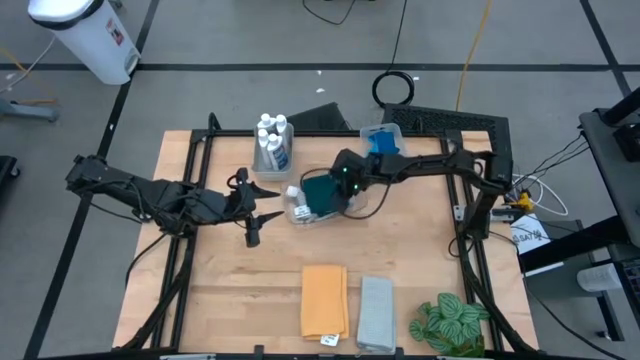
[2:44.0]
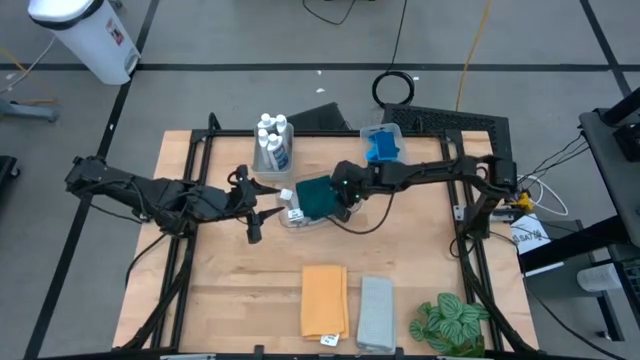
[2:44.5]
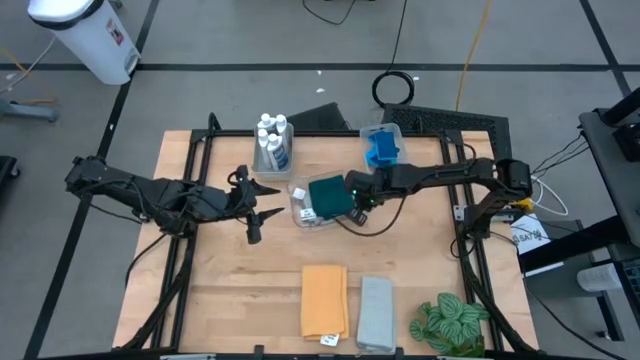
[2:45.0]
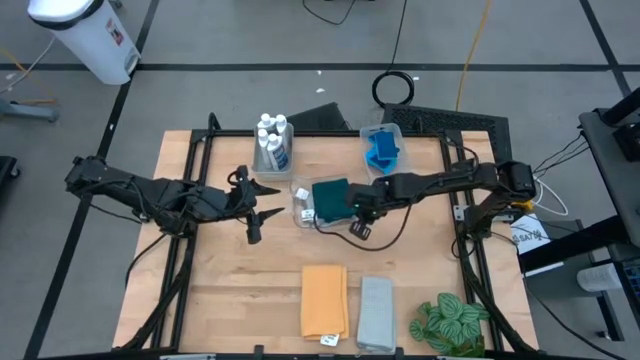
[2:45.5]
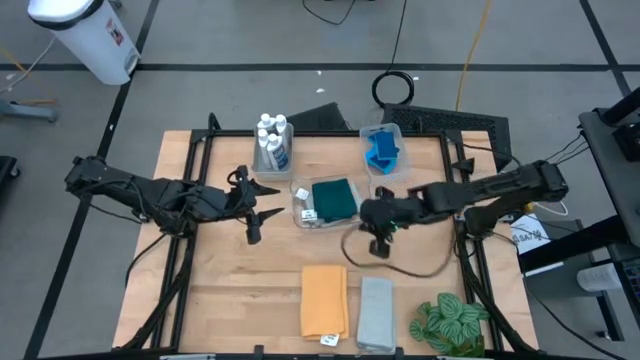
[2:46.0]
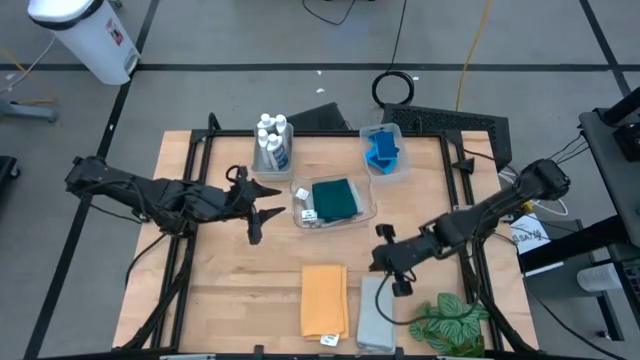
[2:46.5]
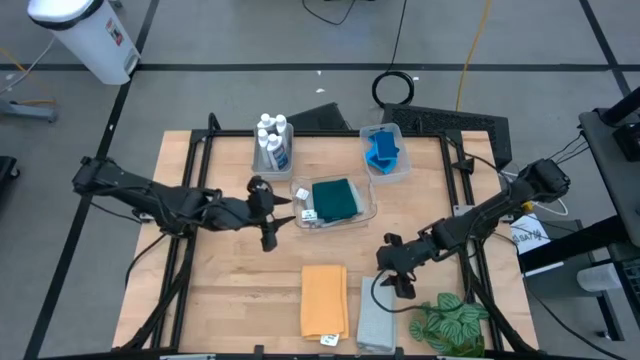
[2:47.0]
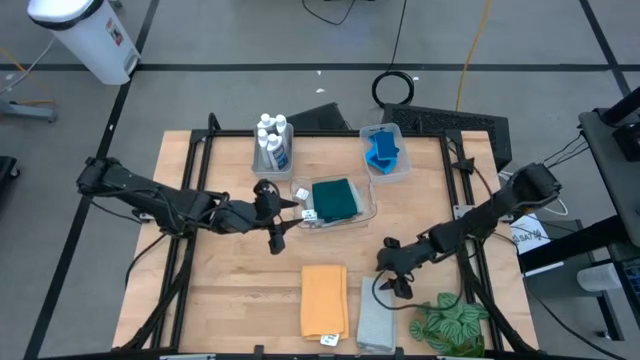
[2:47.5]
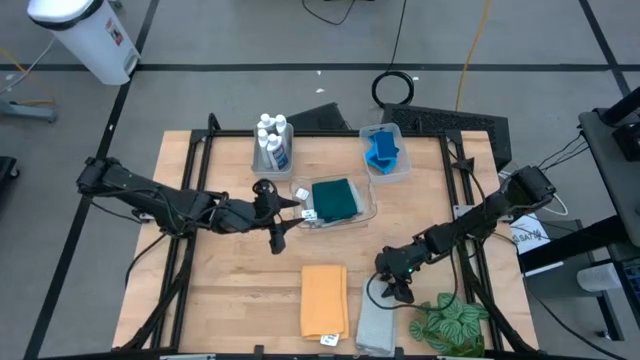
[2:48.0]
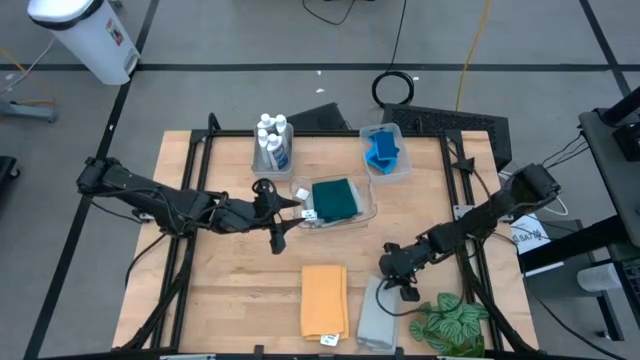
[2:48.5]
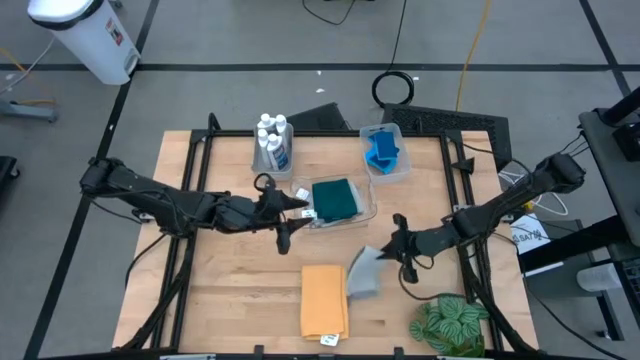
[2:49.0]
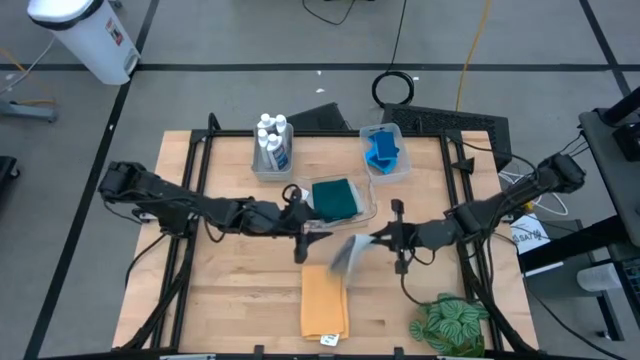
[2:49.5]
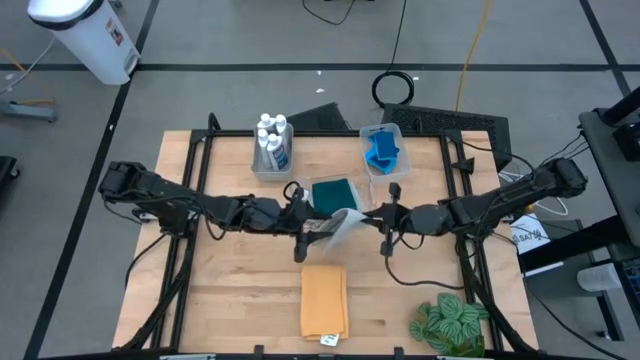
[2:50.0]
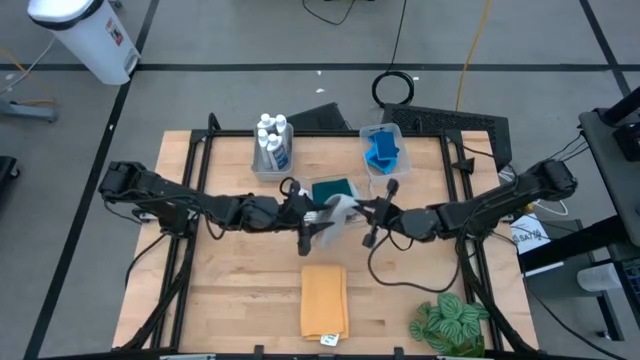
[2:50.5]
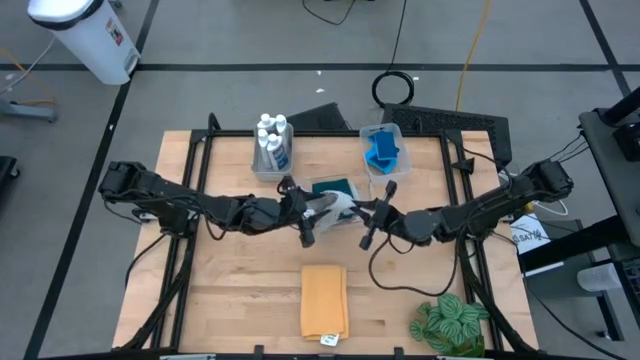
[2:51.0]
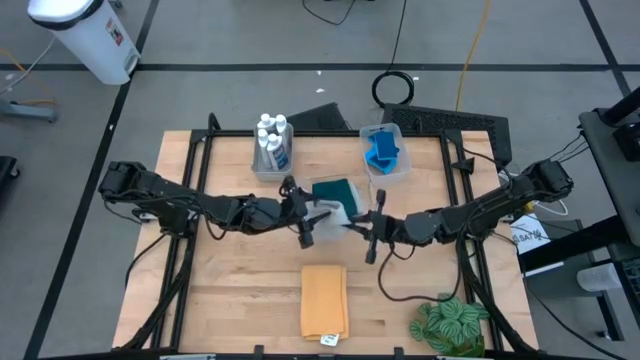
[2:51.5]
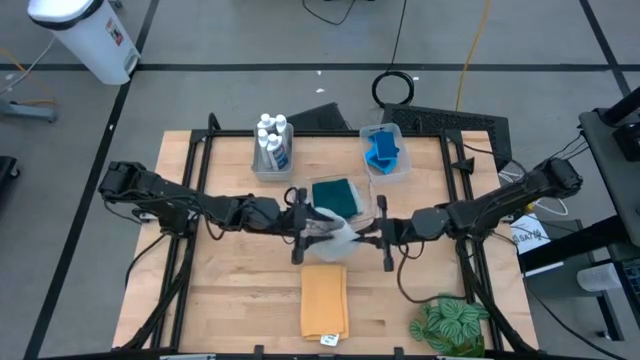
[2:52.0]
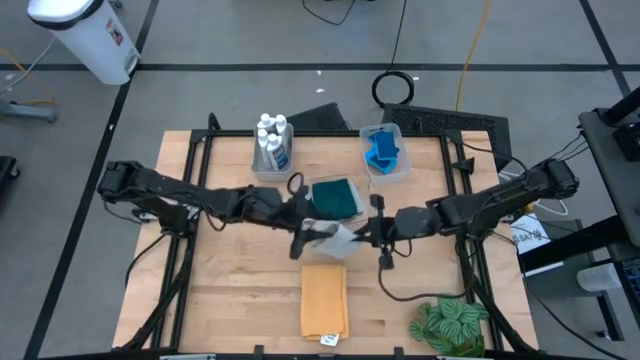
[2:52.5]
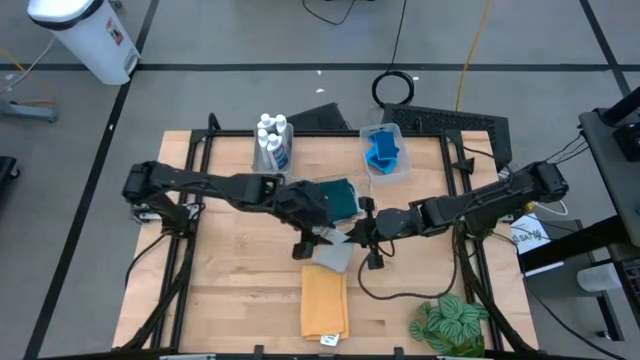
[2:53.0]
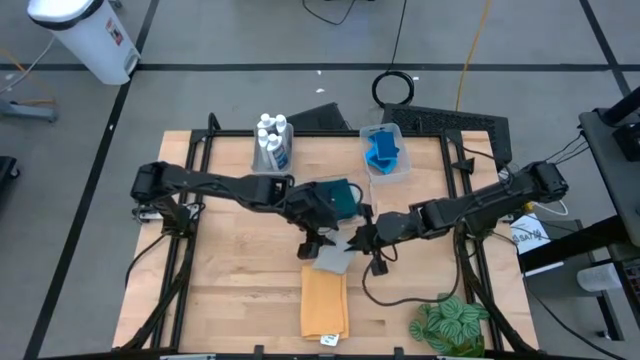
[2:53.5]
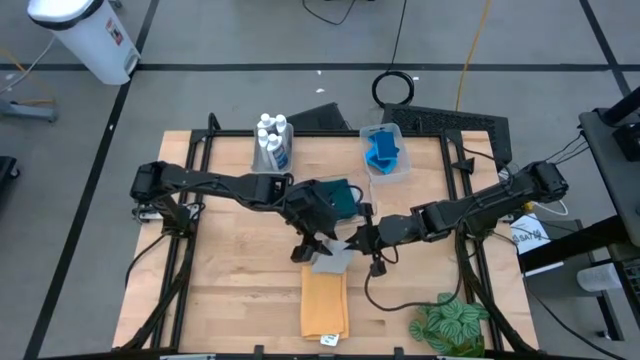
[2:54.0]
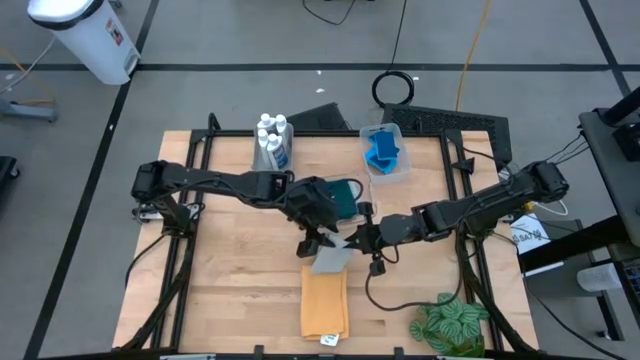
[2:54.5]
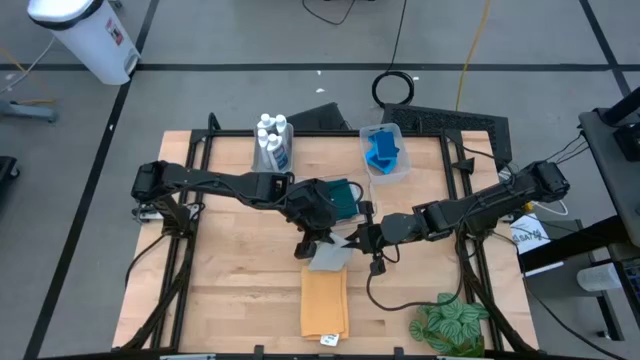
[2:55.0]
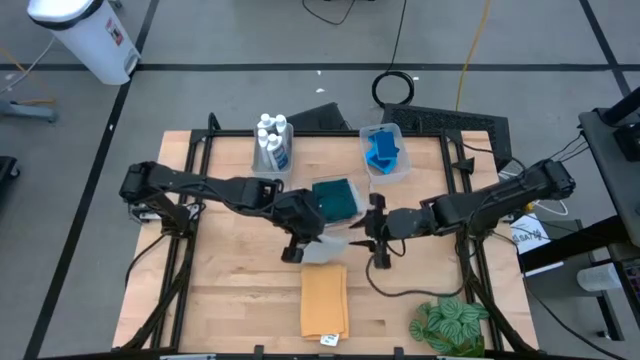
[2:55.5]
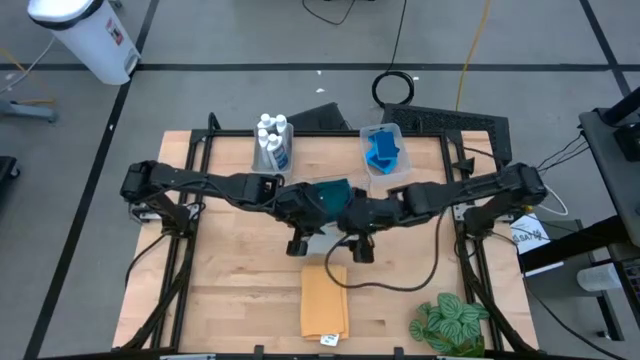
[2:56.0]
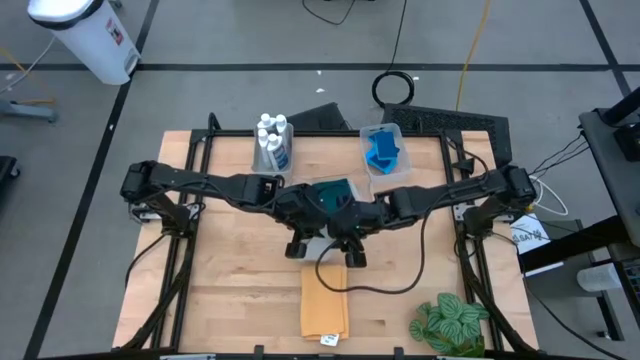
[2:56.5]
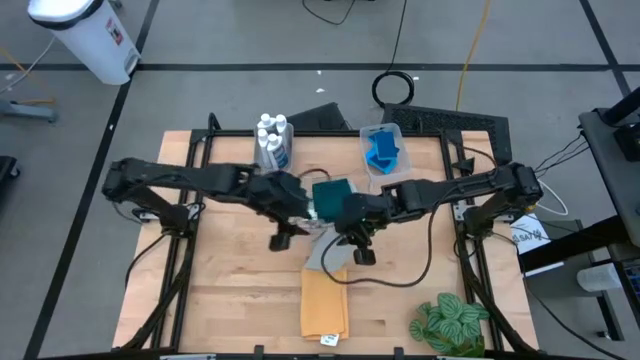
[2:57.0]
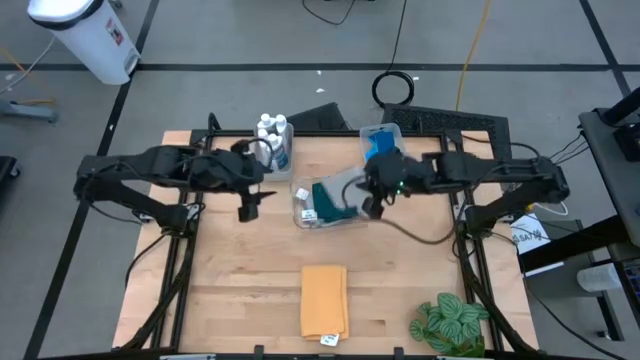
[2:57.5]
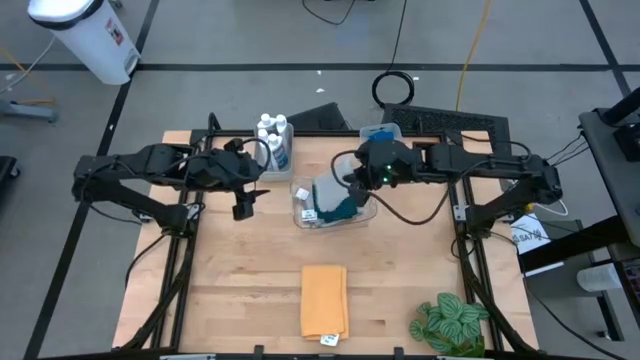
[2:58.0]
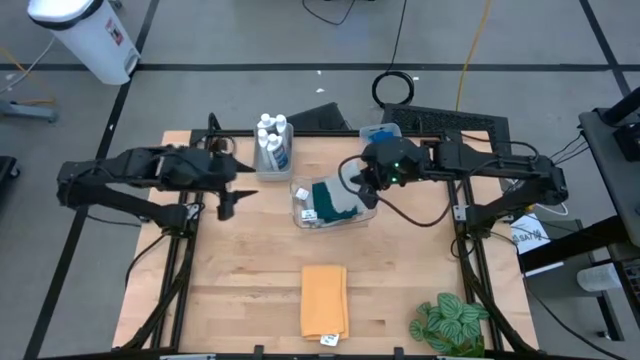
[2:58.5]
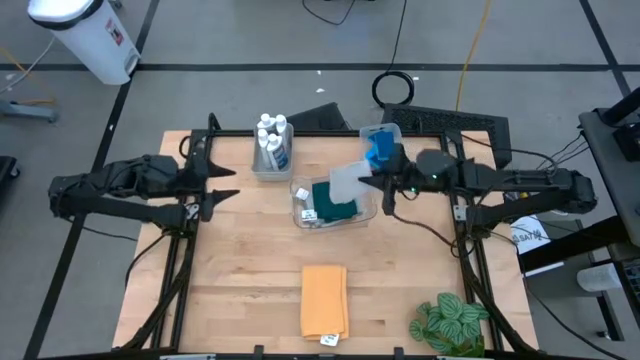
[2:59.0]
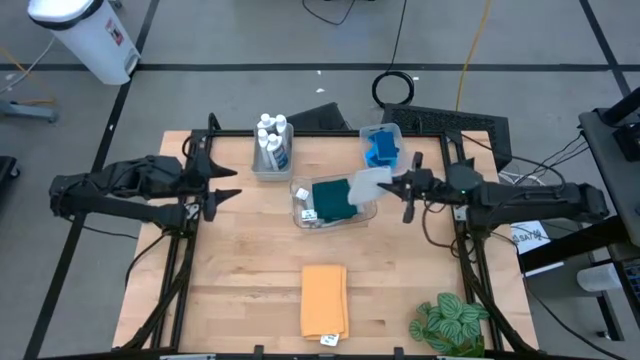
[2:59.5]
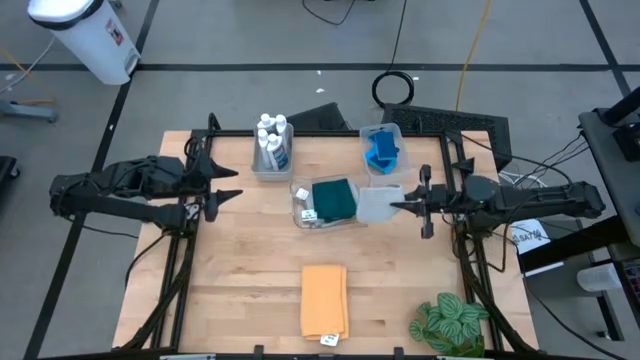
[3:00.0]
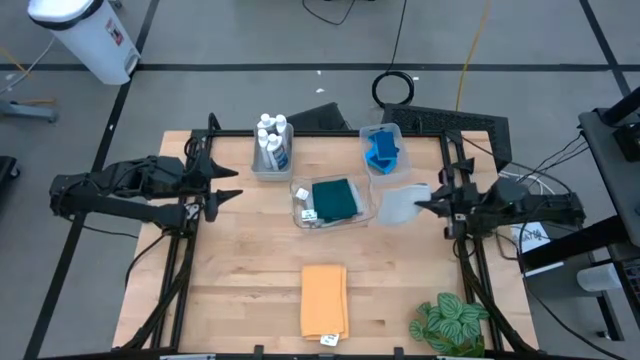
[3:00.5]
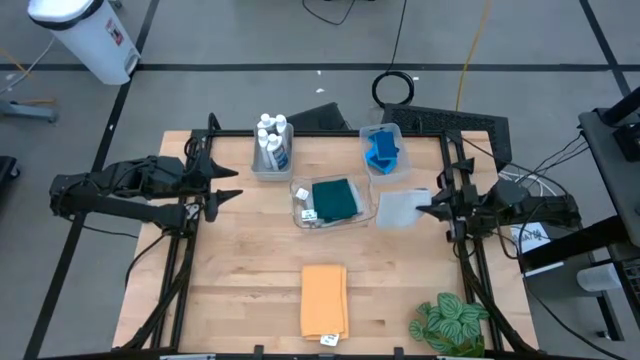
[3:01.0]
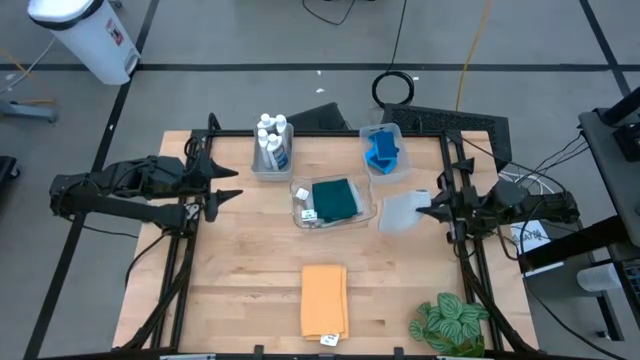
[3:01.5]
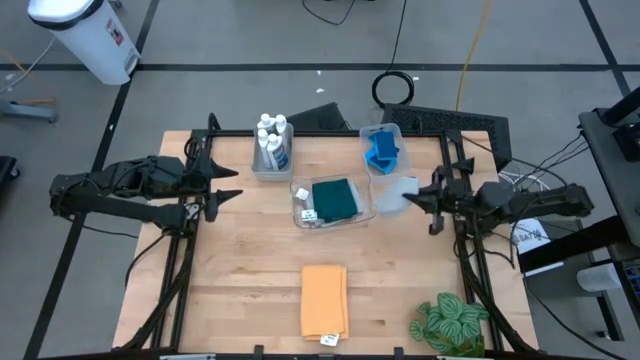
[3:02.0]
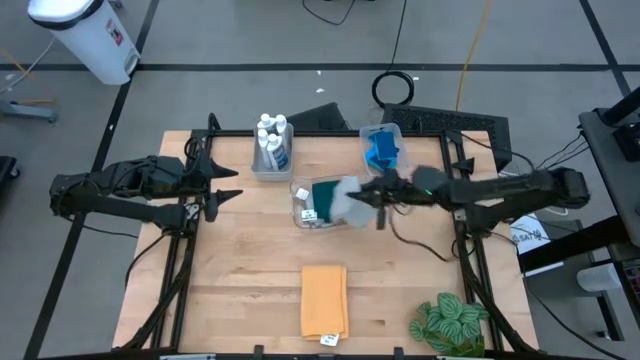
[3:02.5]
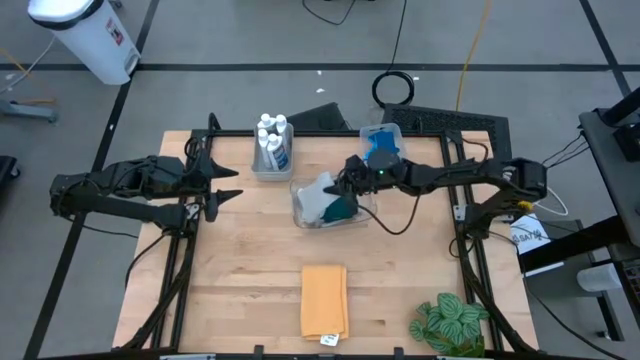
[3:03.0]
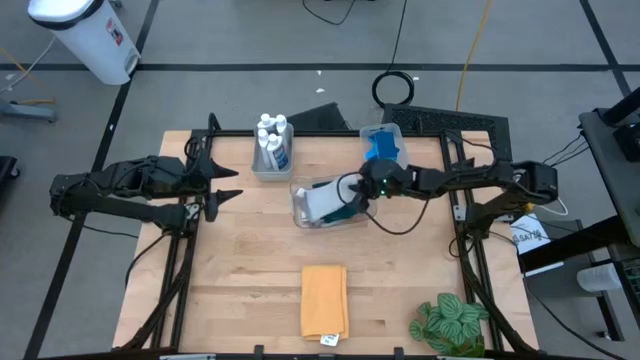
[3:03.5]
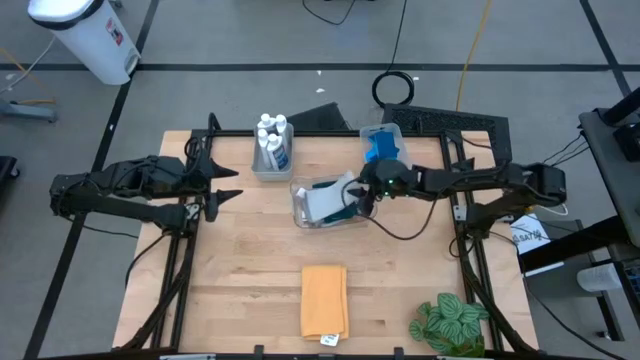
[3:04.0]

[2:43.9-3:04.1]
Task: Pick & Place Kitchen Items
Put the gray towel into the transparent bin
